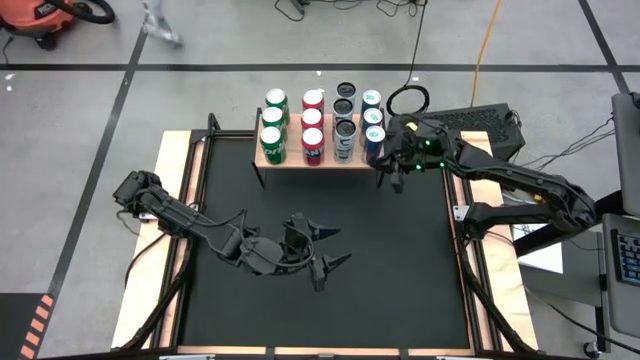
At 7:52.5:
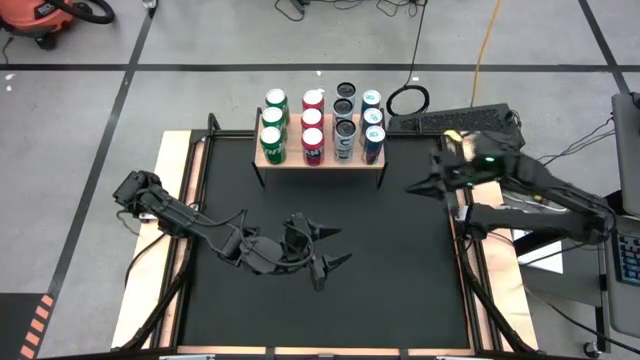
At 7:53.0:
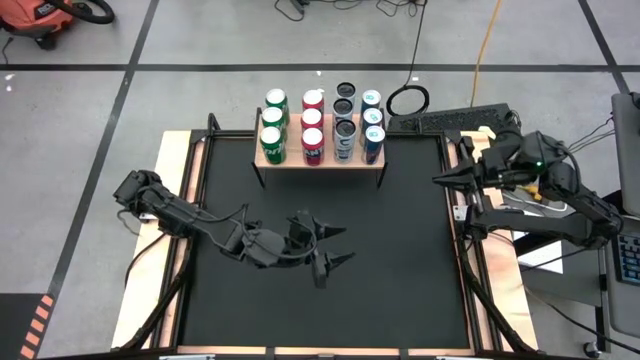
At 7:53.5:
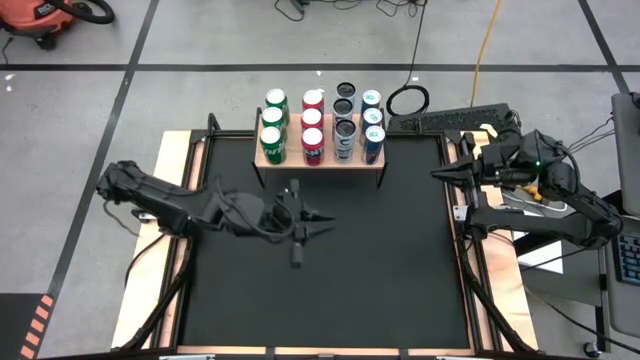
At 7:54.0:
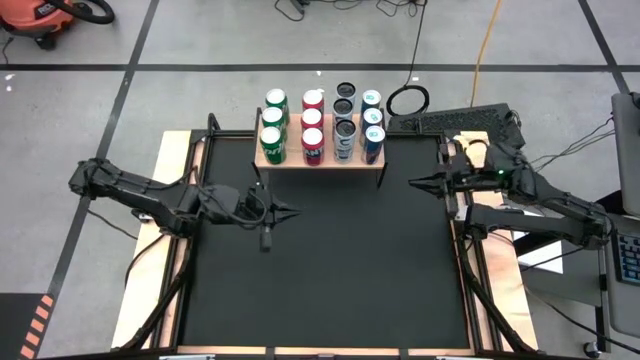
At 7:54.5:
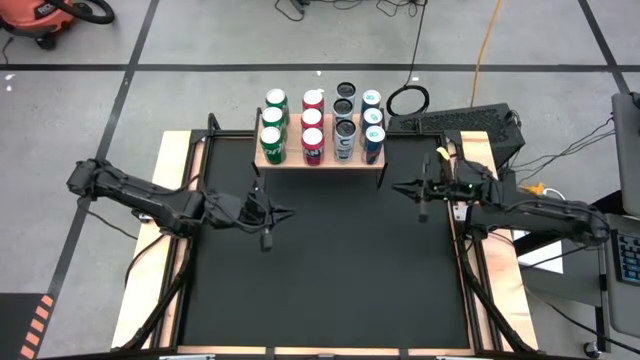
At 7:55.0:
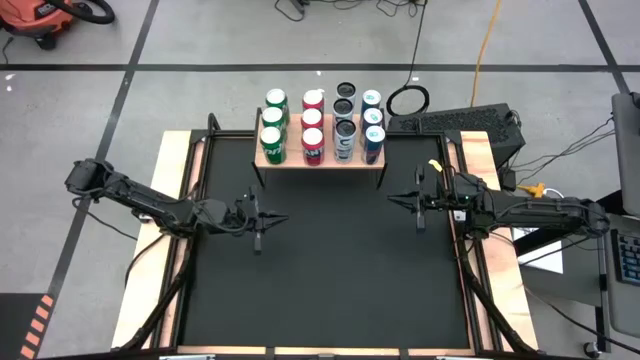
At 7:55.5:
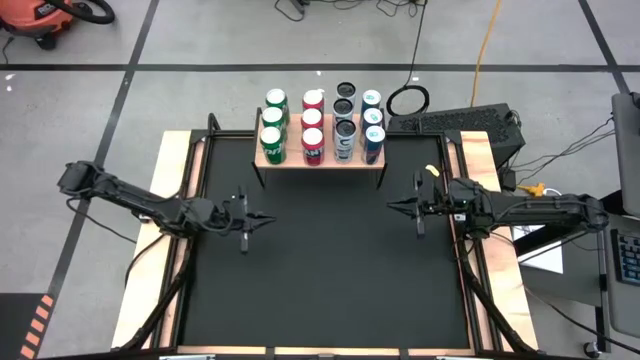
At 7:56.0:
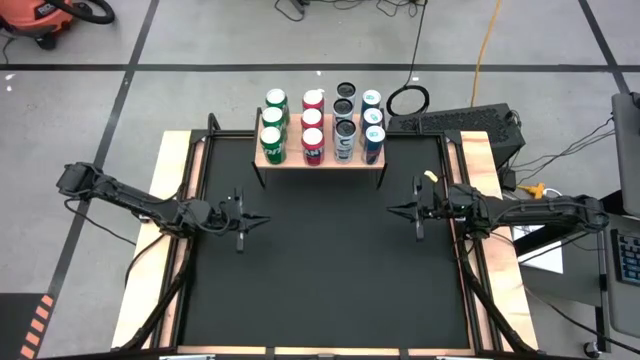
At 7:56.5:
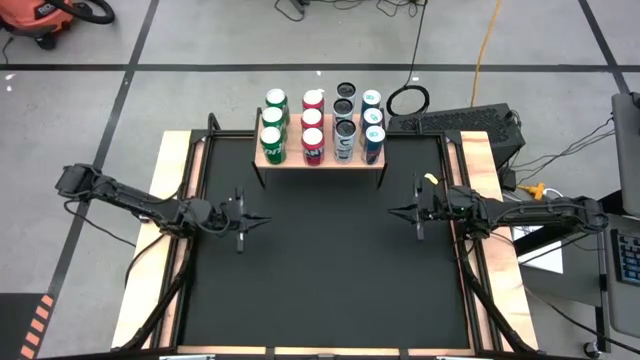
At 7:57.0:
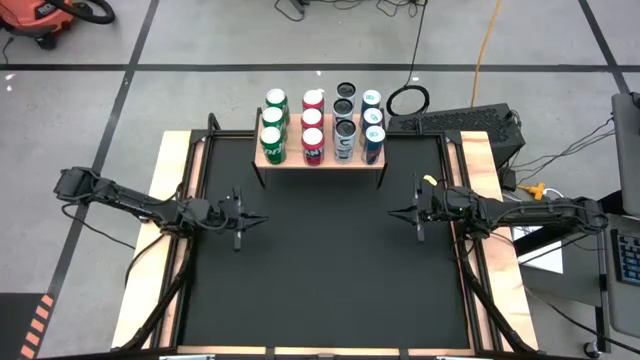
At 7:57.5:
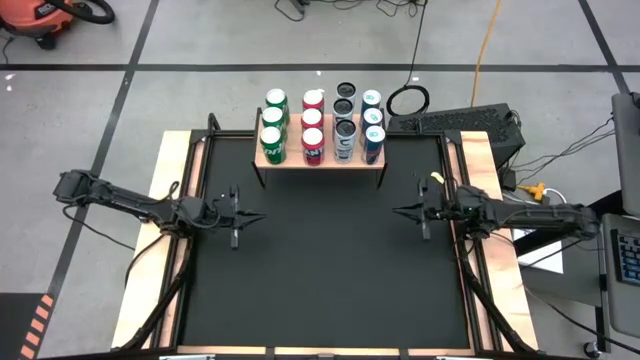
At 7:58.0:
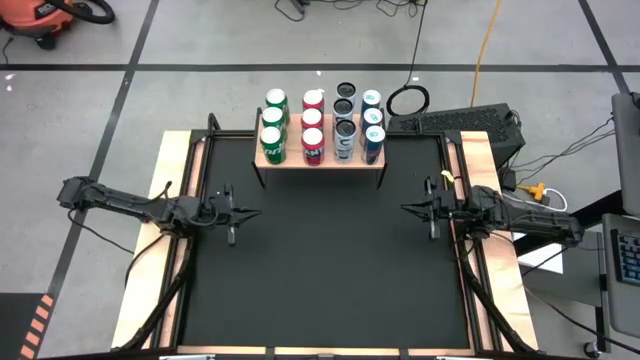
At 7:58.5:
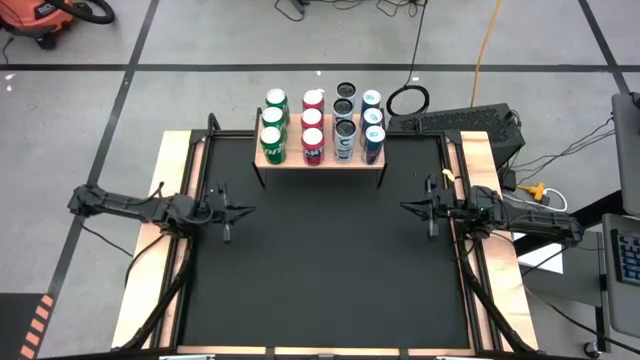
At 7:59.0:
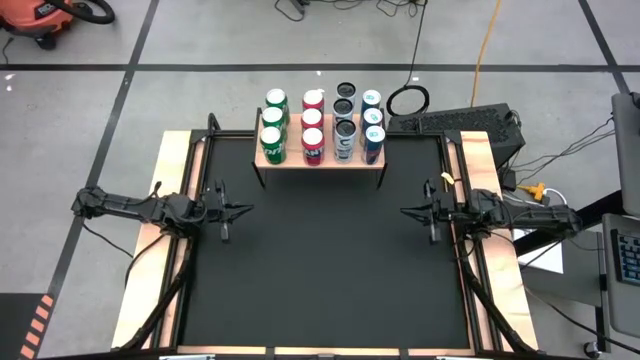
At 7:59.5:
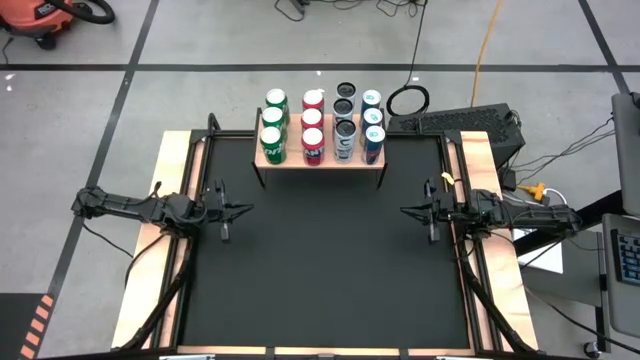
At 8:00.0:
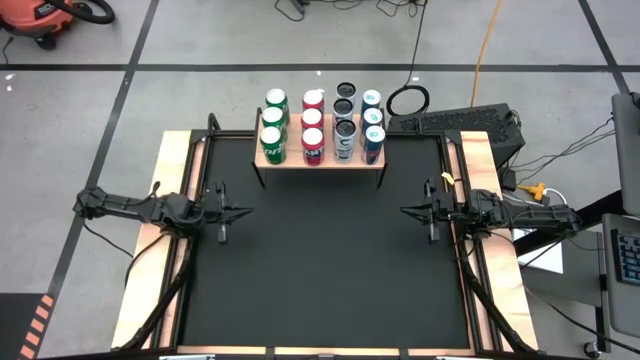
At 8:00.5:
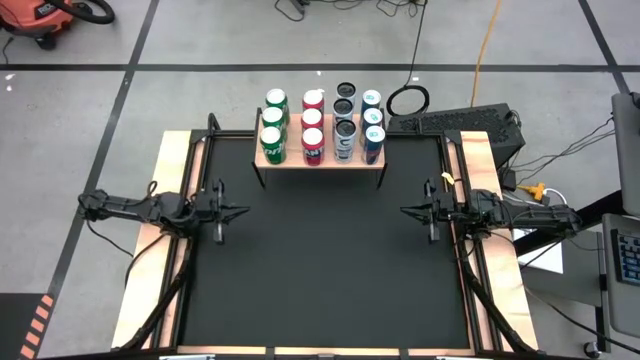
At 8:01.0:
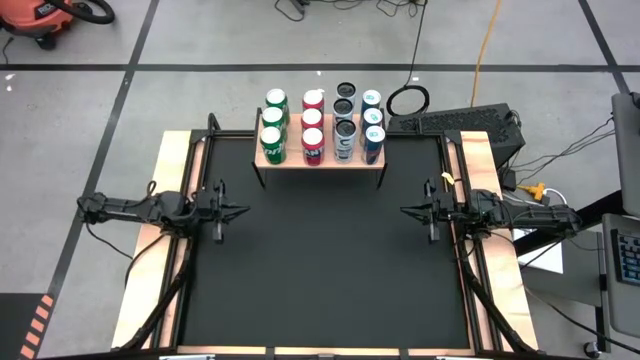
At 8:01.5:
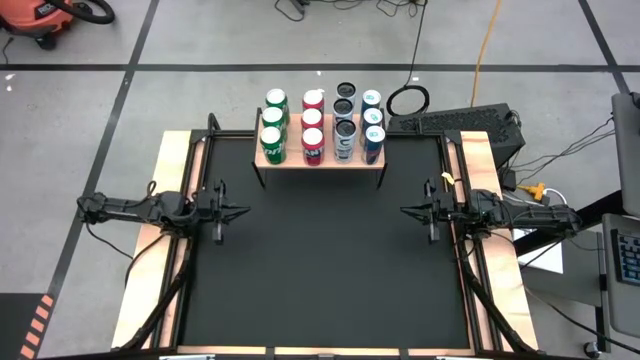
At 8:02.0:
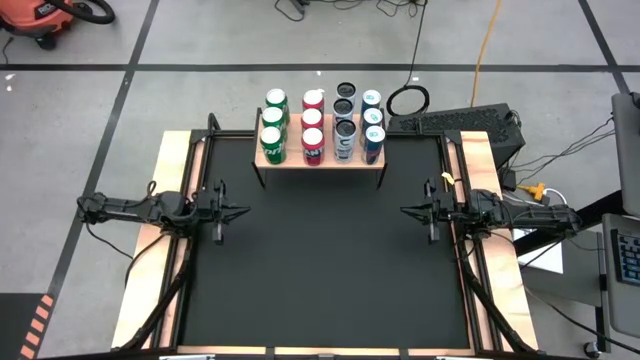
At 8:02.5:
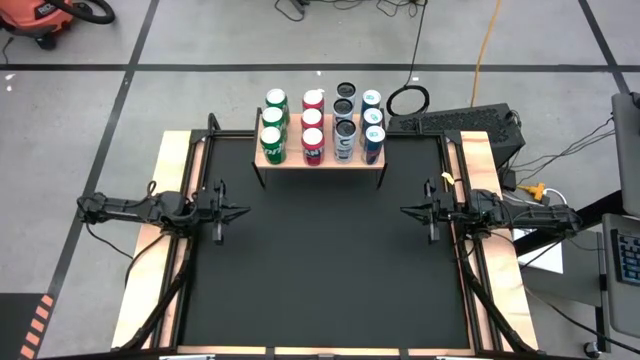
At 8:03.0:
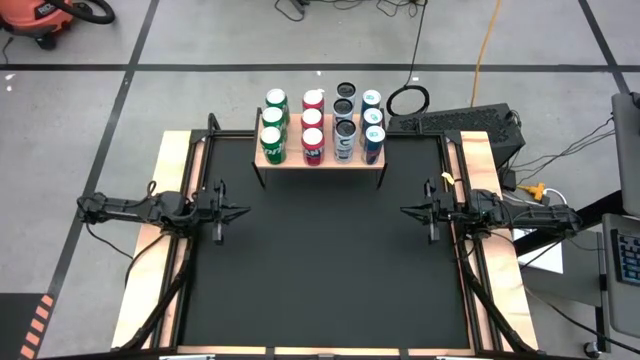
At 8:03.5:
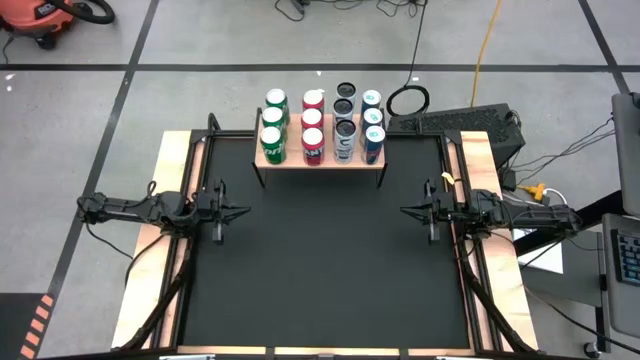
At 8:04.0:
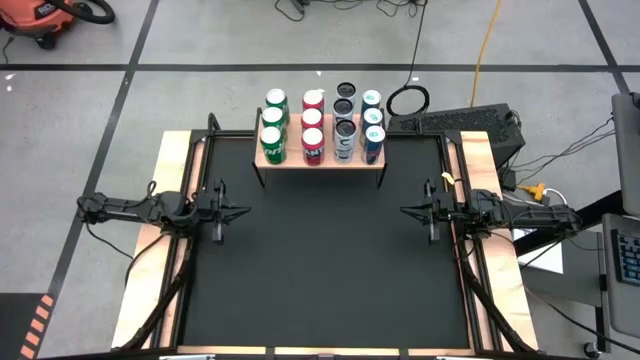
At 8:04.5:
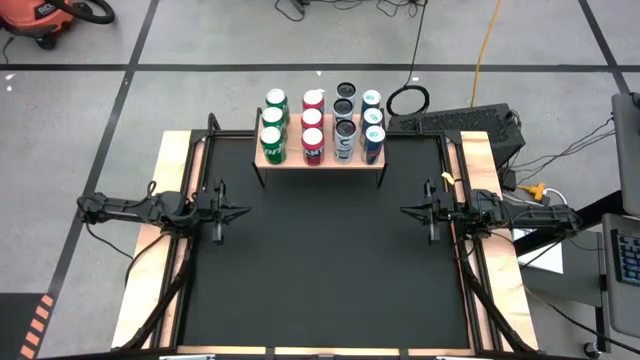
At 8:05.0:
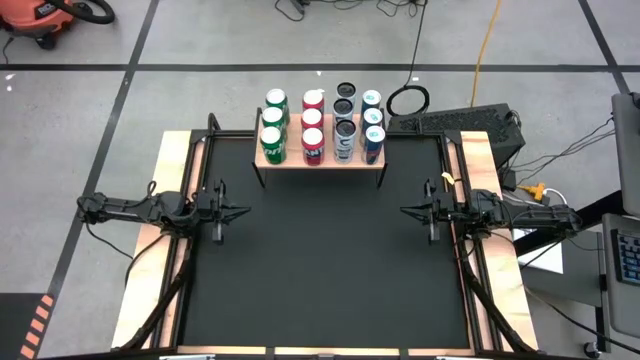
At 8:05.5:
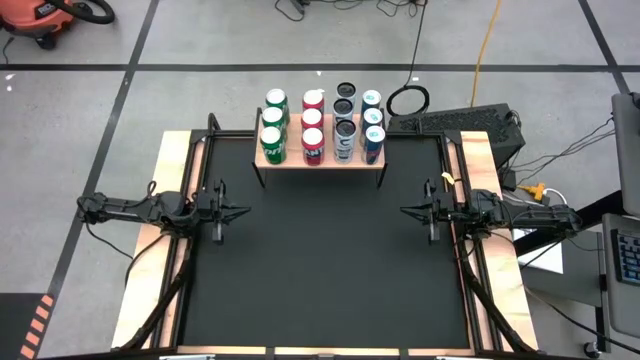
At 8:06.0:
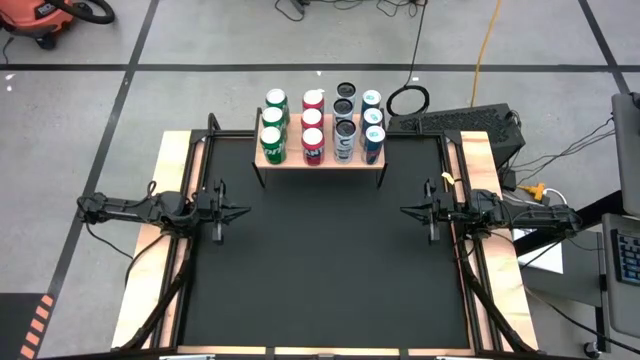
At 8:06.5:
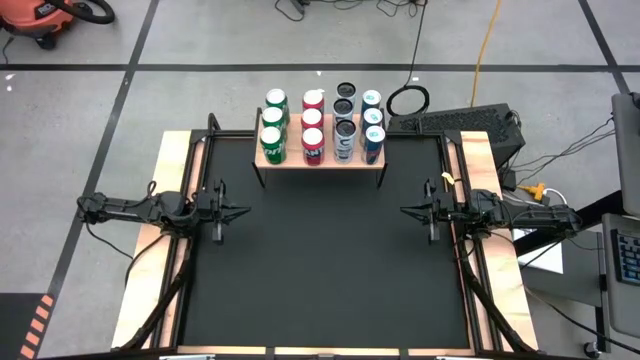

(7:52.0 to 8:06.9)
Task: Place canned beverage on shelf
Return to Home Position

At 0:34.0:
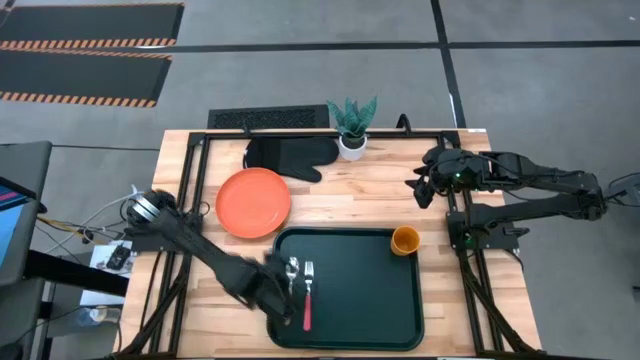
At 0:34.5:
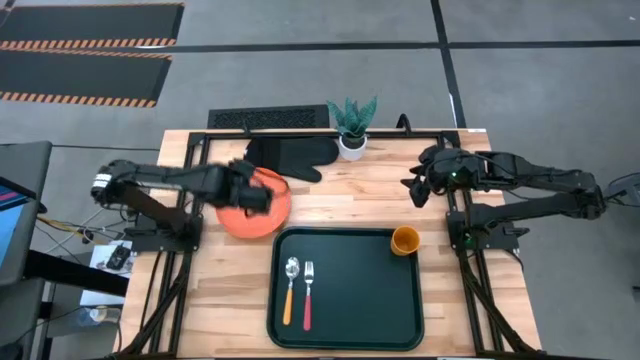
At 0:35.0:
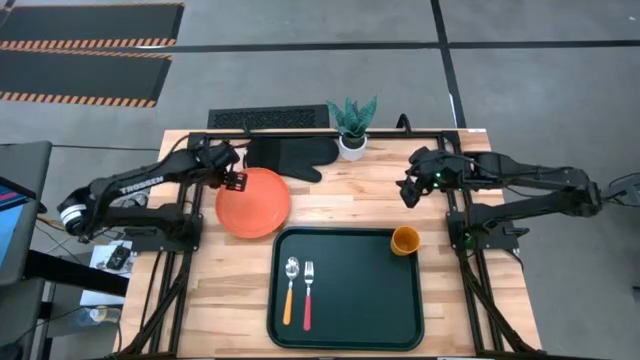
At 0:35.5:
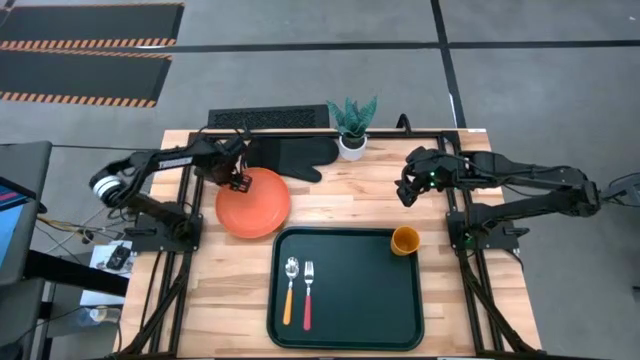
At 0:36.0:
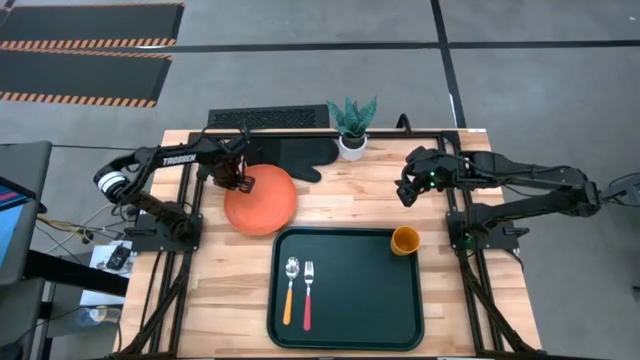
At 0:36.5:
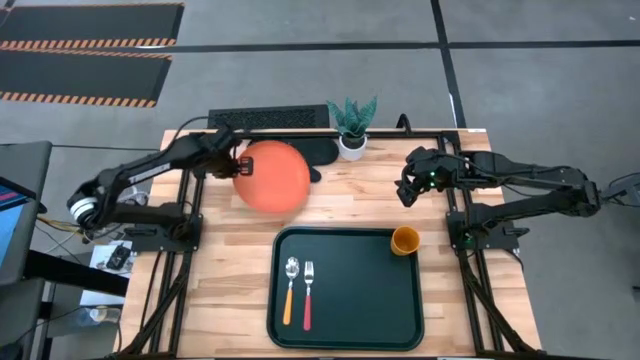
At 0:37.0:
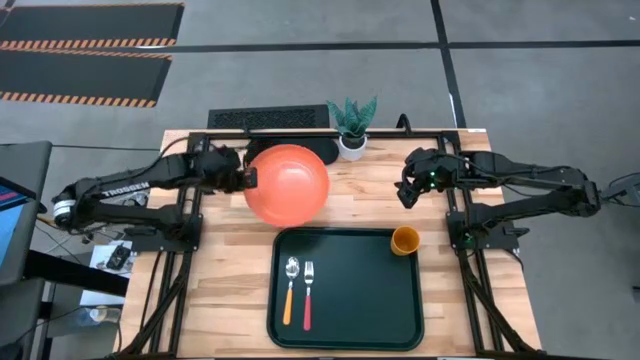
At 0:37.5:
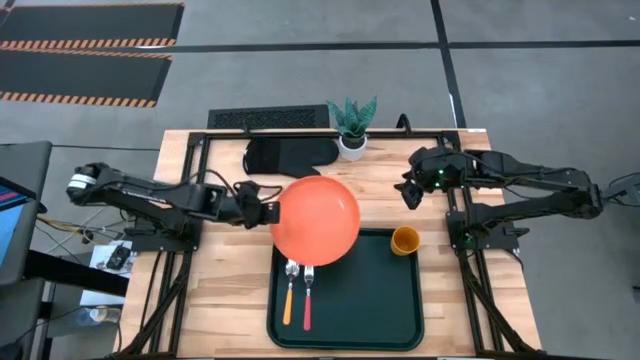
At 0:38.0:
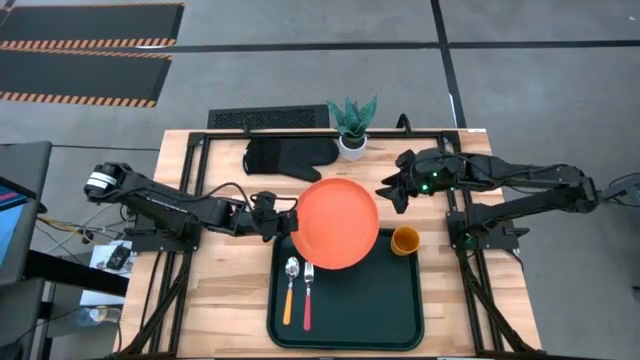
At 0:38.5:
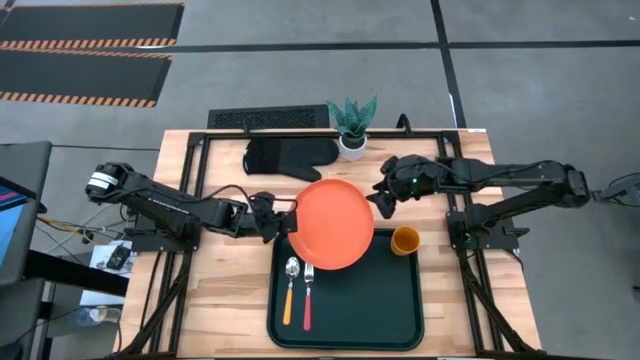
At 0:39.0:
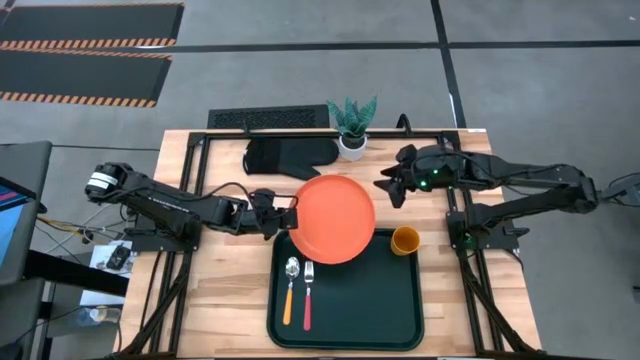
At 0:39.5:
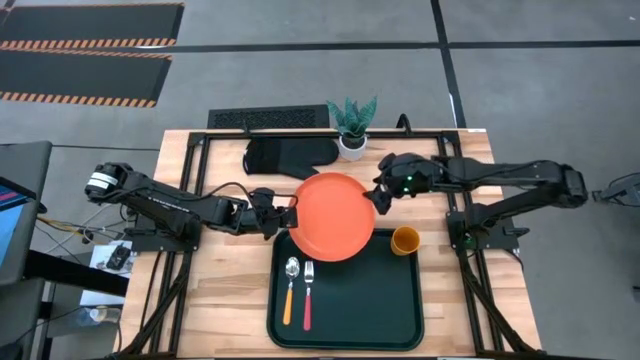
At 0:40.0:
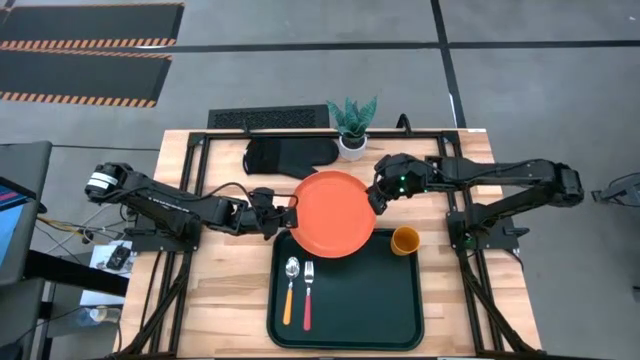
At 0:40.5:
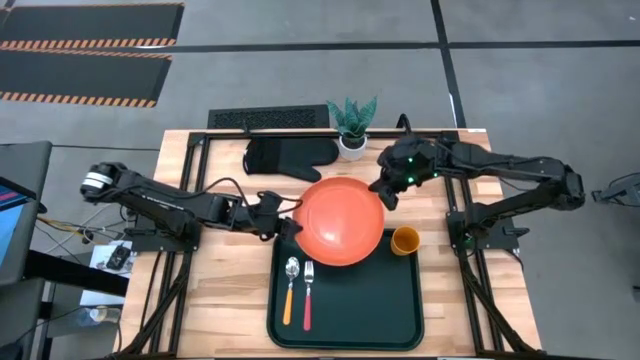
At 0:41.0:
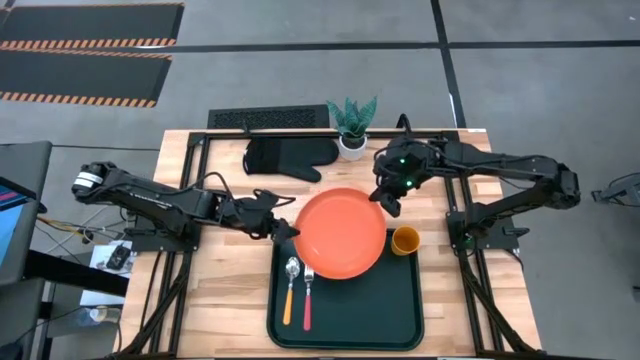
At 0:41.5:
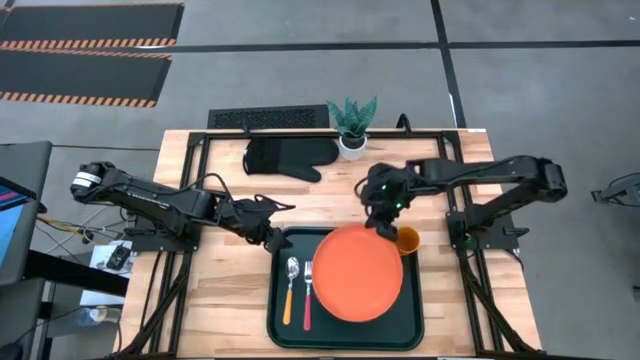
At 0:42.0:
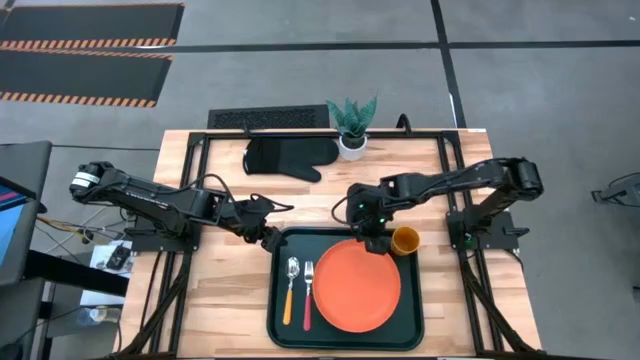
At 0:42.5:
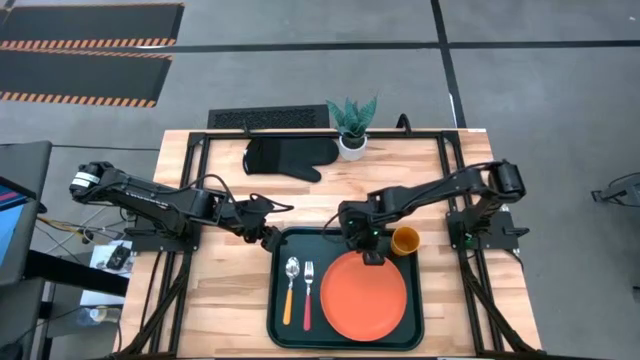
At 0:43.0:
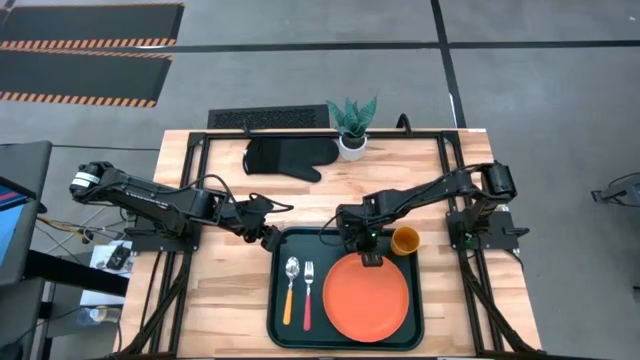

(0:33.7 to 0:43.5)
Task: Pick and place plate/cup/fork/spoon on tray
Put the orange plate on the black tray to the right of the pink fork
